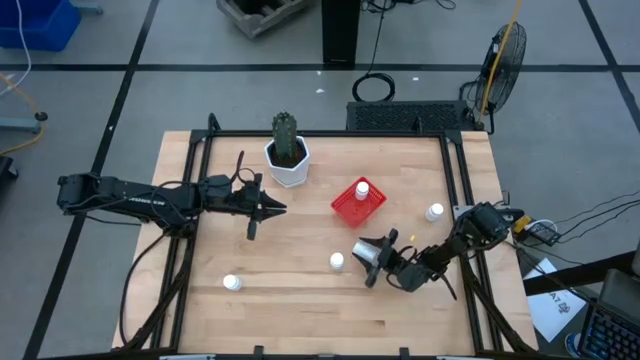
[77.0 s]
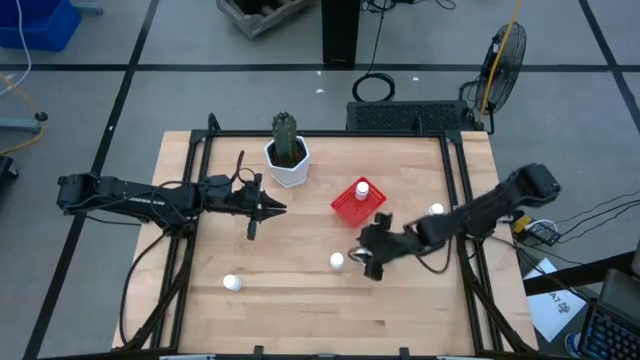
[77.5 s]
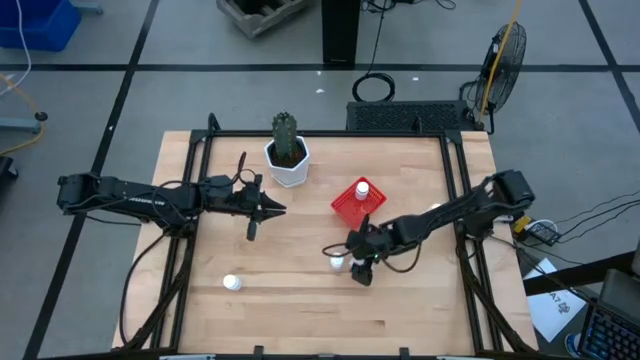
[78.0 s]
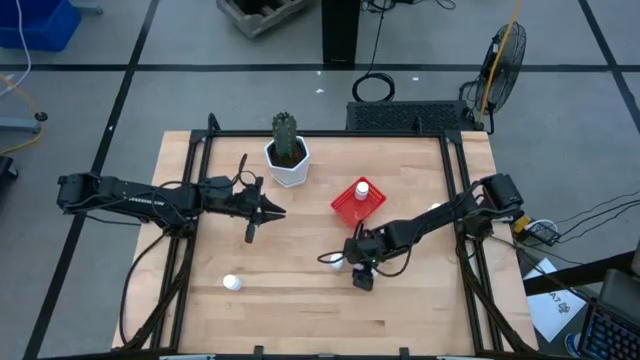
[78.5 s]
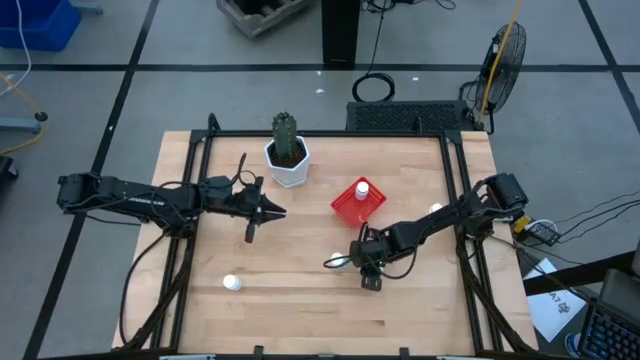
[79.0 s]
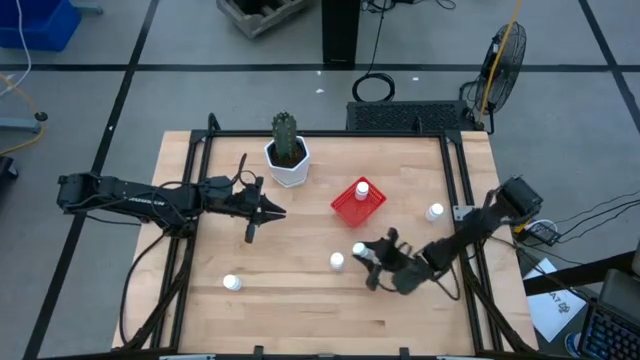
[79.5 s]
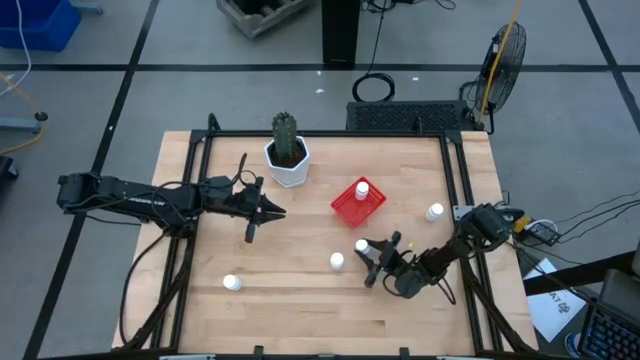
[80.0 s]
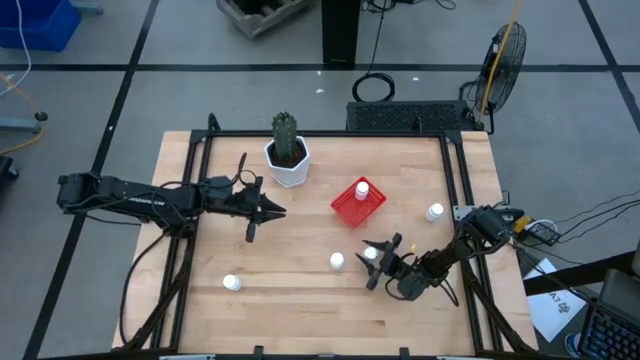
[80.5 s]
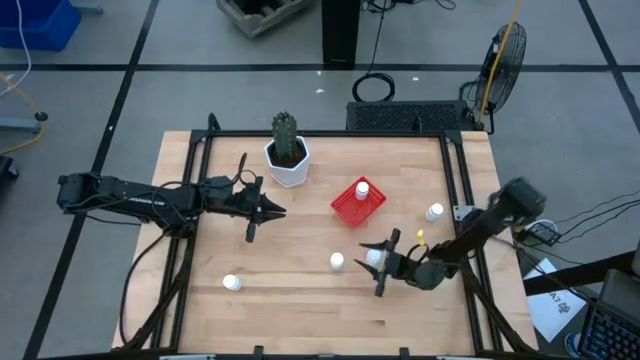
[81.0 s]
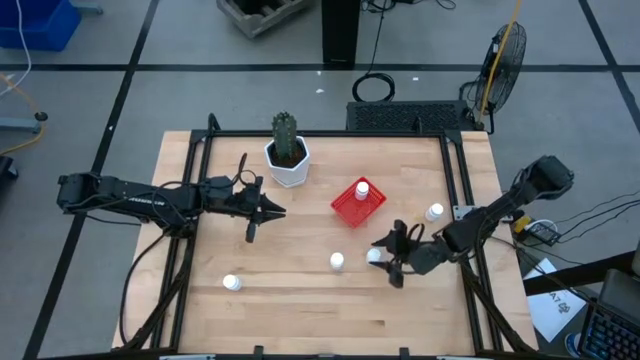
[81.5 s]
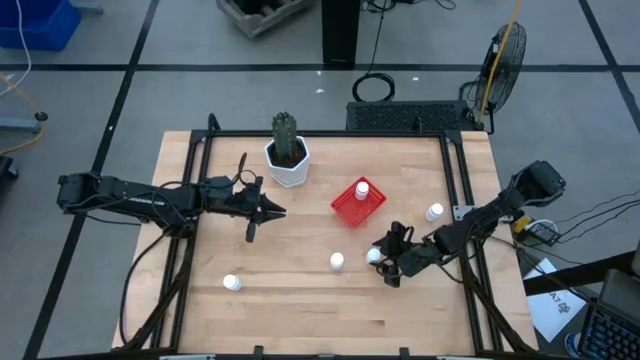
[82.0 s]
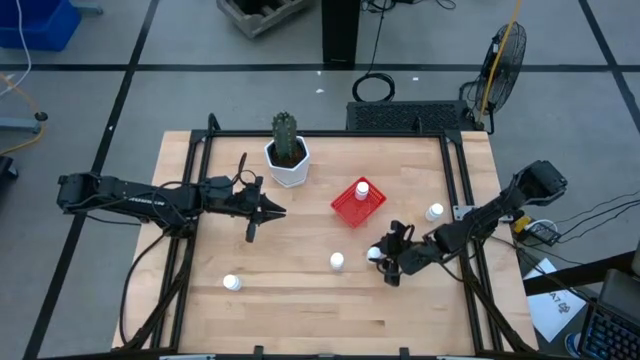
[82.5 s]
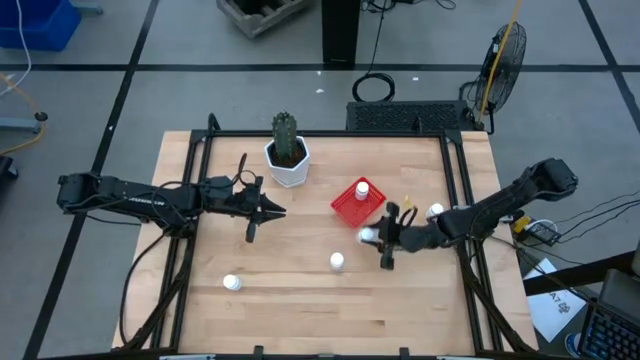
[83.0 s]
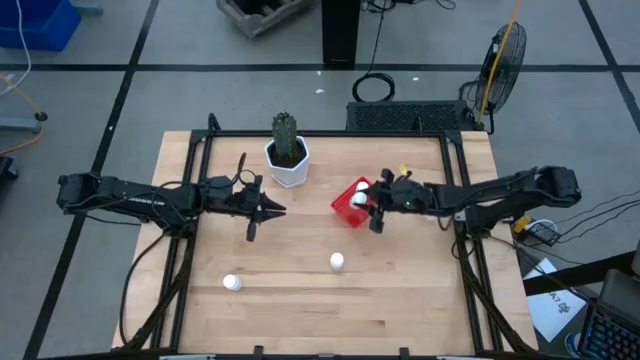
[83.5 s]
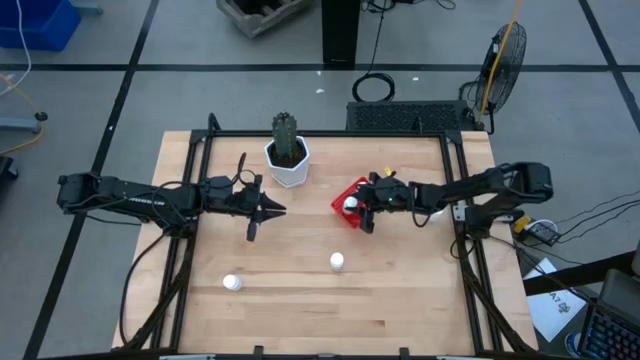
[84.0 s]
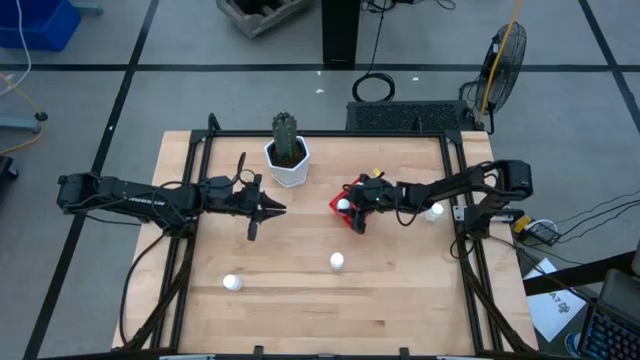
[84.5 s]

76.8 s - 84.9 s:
Task: Pick and place pill bottles into a basket
Put the white pill bottle into the red bin

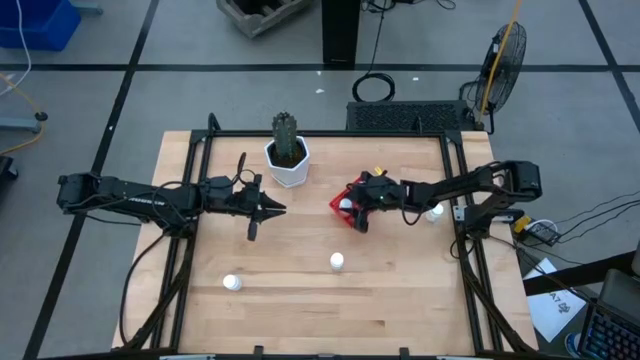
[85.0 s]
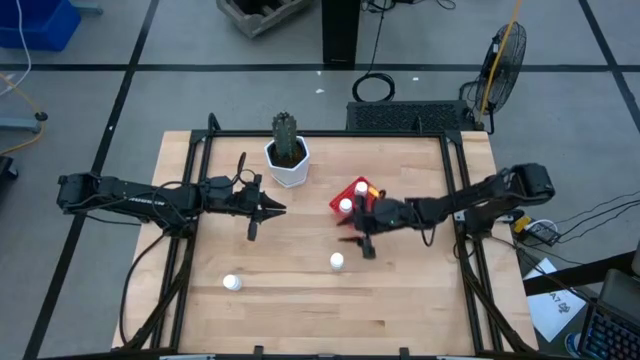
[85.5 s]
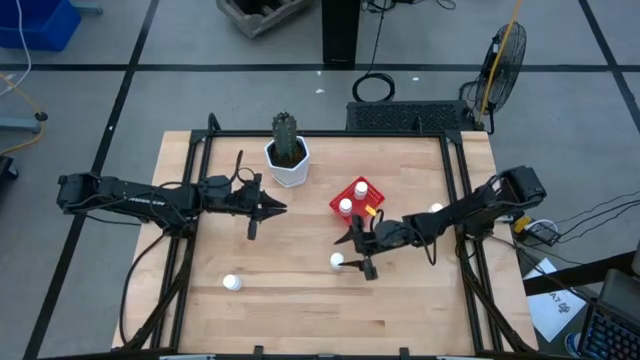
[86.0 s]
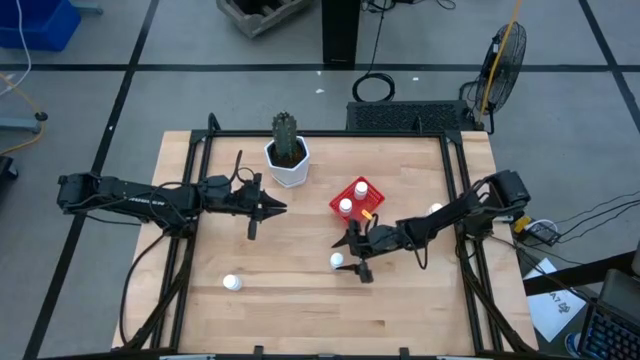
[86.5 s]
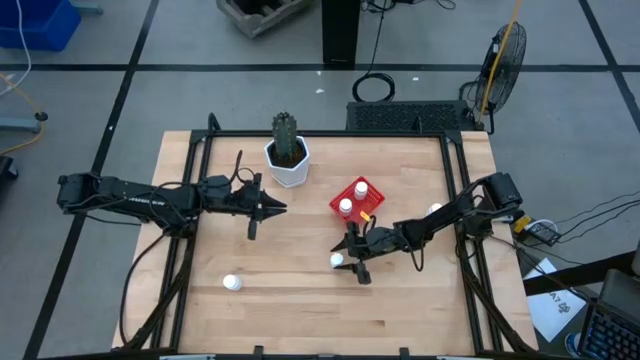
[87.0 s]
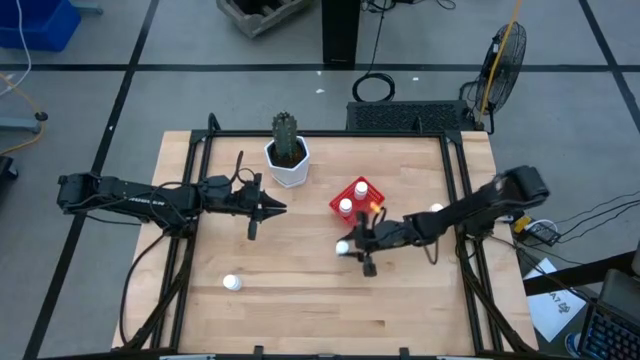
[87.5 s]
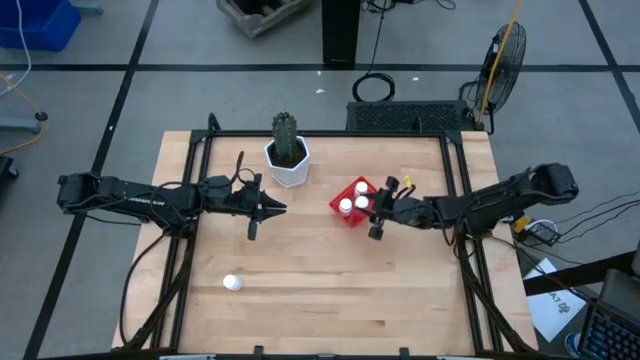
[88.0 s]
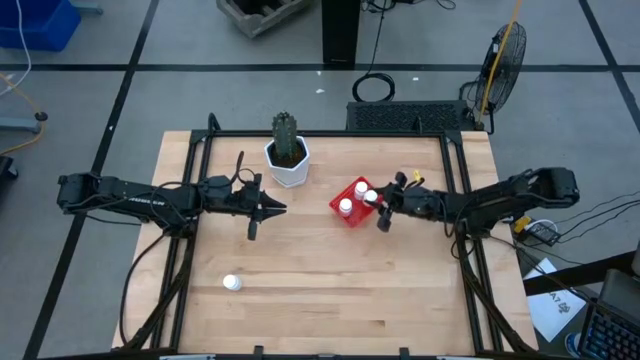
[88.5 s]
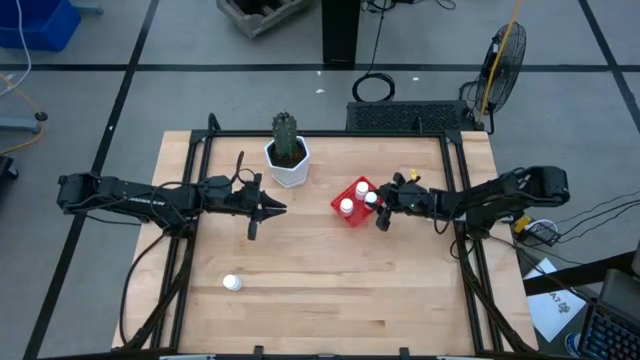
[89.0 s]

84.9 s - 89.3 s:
Put the white pill bottle into the red bin

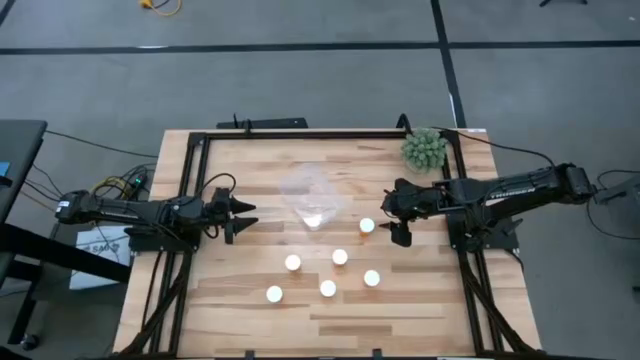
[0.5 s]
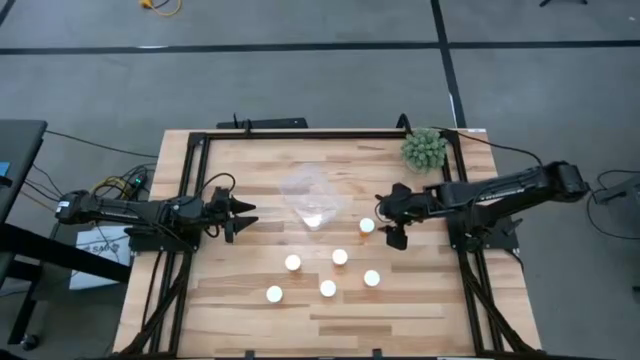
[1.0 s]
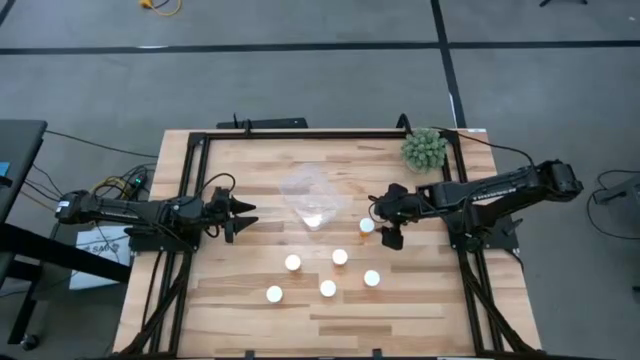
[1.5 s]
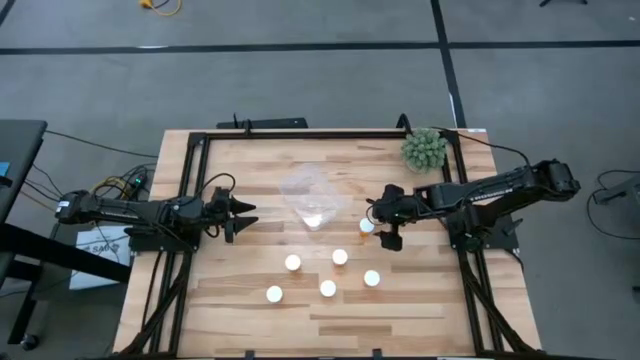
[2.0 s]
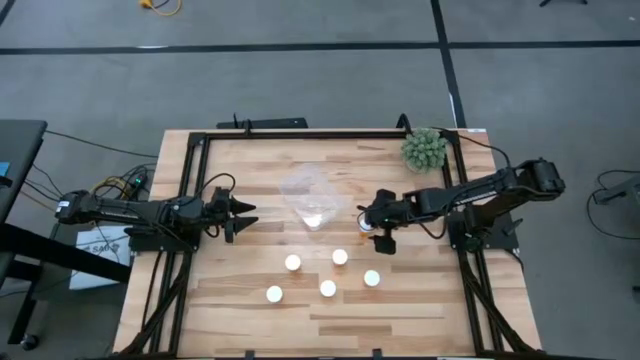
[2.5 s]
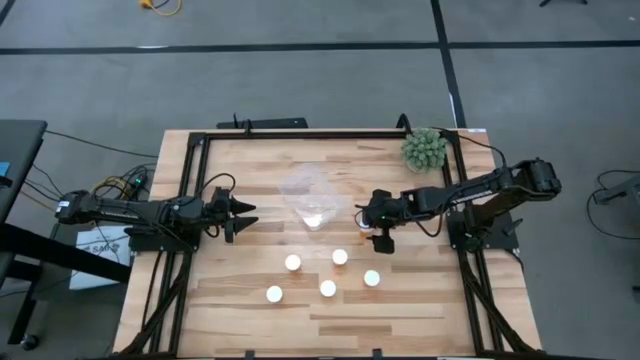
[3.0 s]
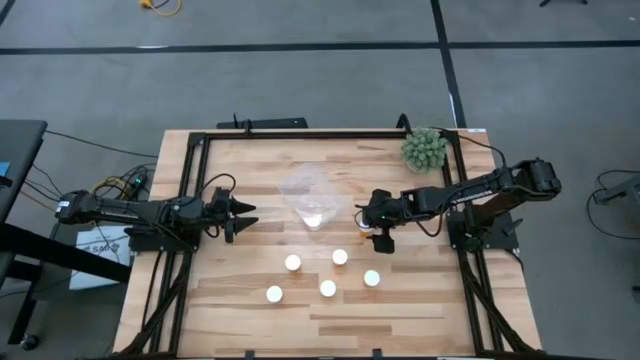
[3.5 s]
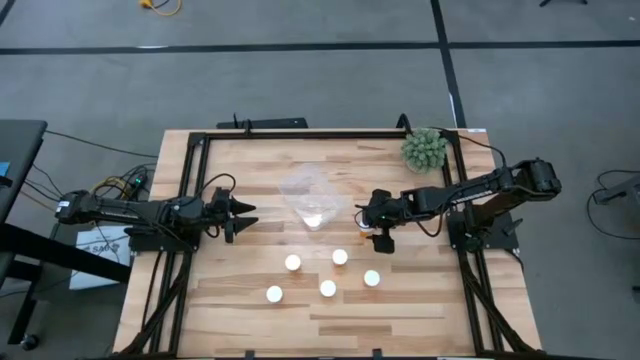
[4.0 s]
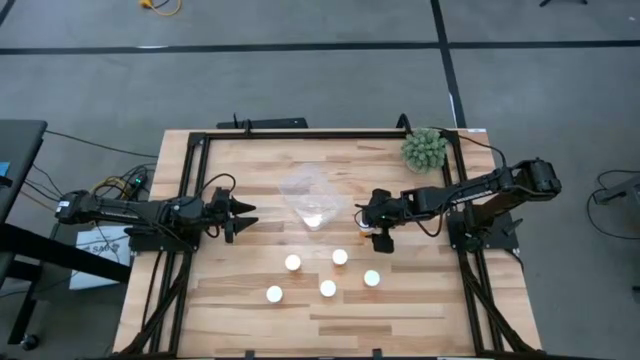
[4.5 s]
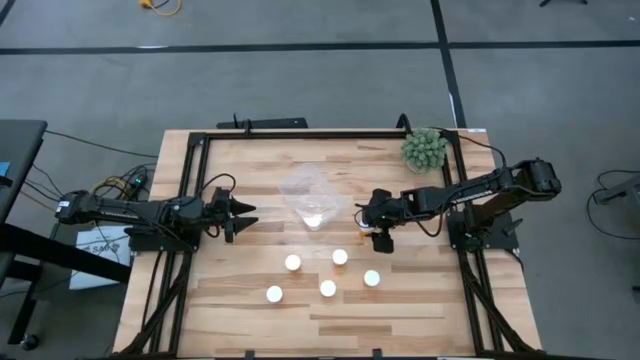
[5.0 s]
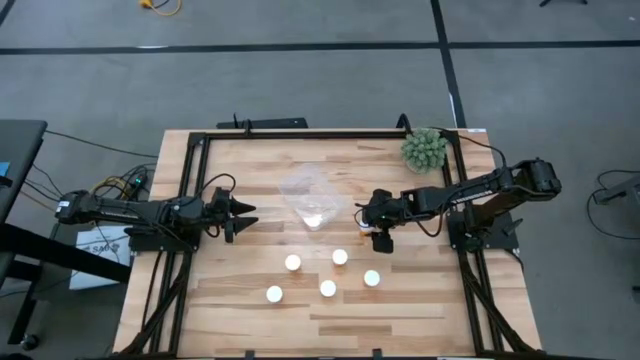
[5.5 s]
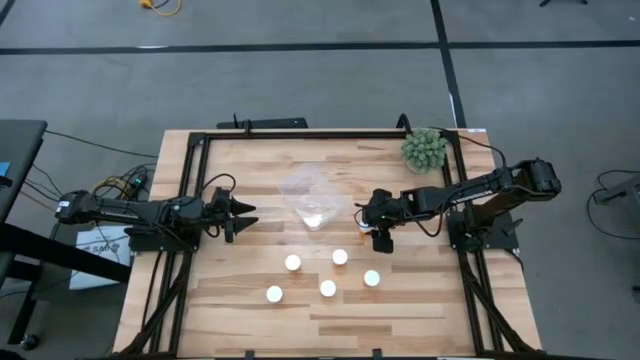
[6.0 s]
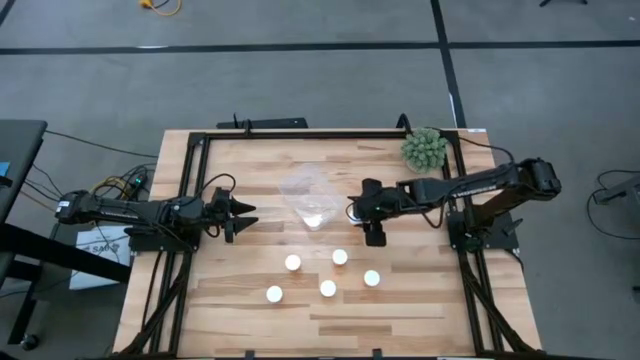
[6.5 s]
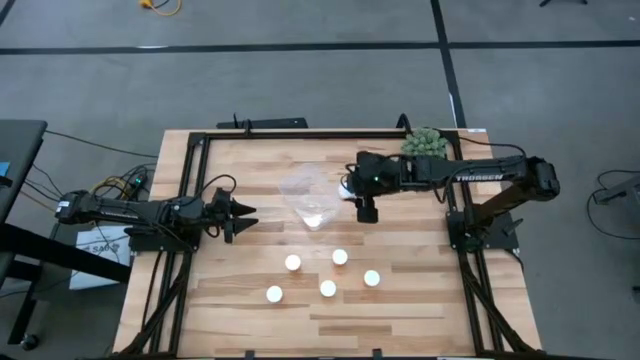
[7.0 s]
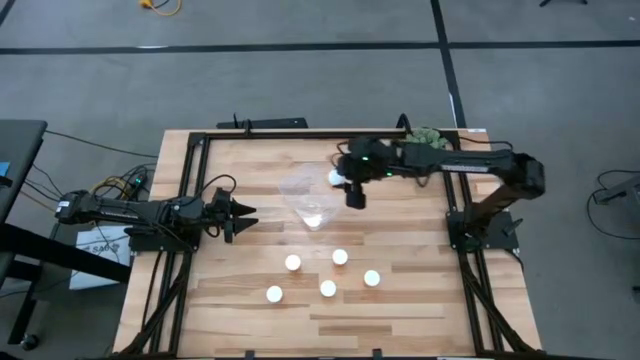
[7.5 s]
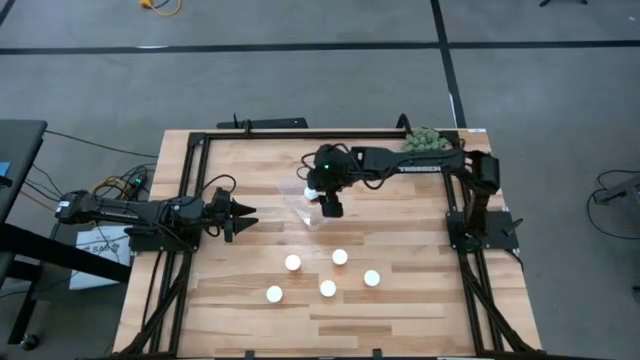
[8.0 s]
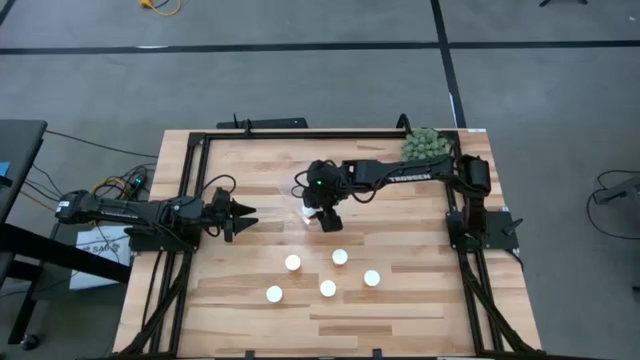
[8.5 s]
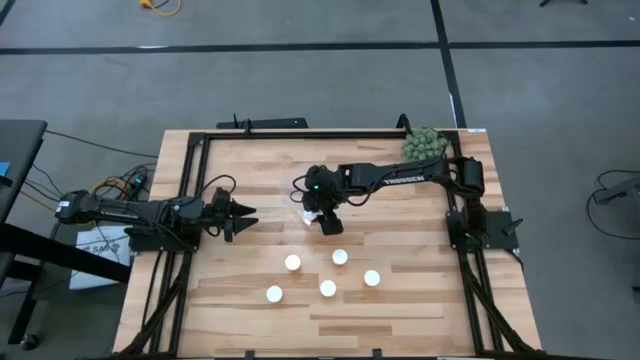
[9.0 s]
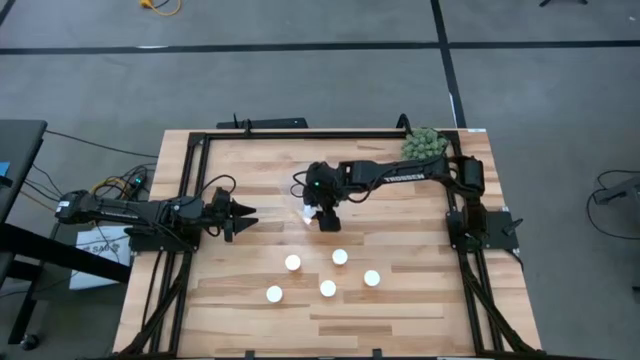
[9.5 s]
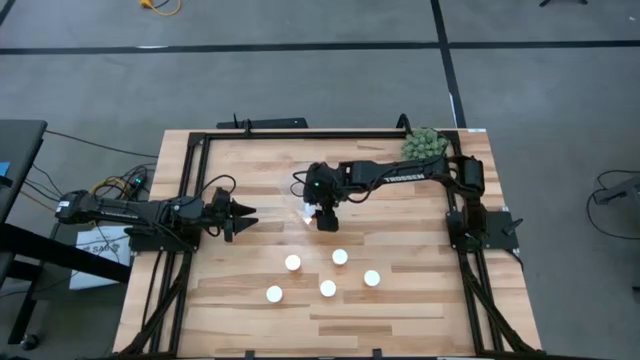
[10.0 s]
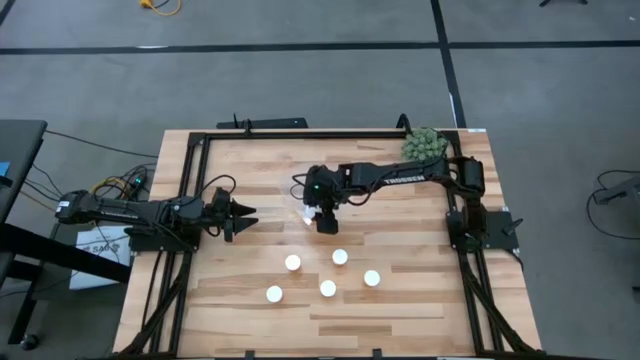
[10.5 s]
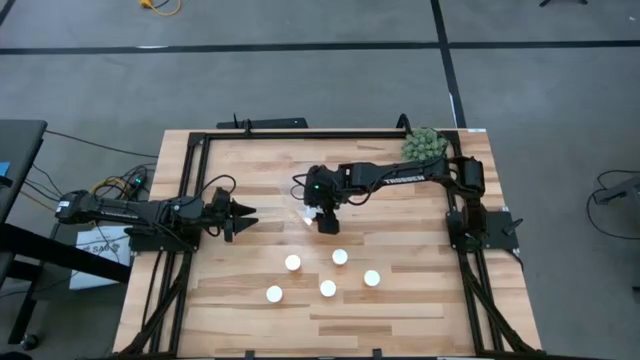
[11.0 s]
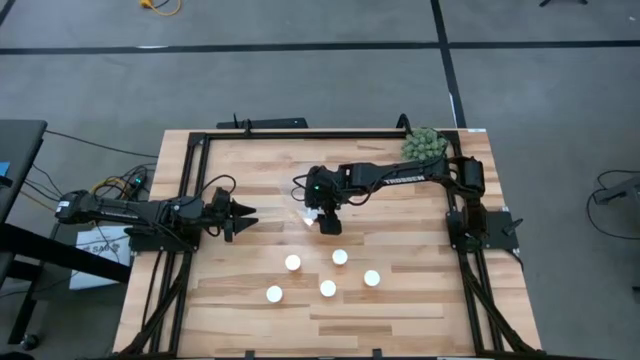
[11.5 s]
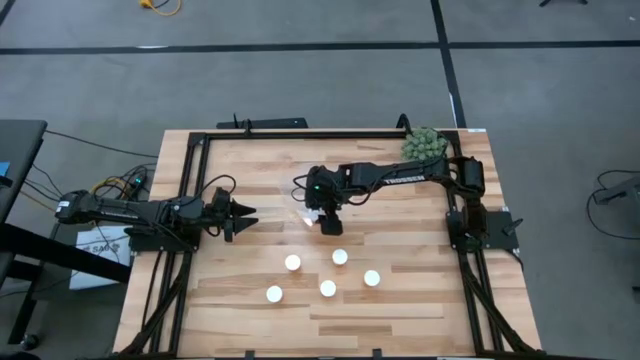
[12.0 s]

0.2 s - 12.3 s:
Task: Pick and place pill bottles into a basket
Put the orange medicine bottle into the transparent bin
